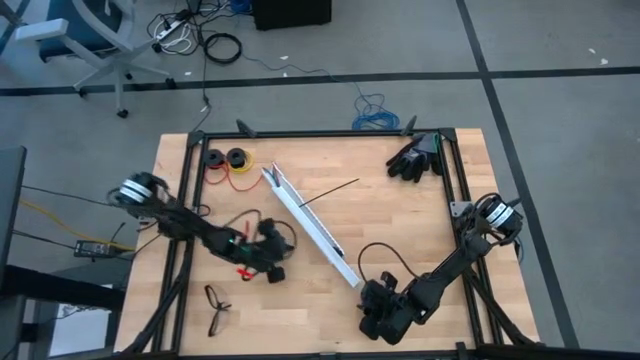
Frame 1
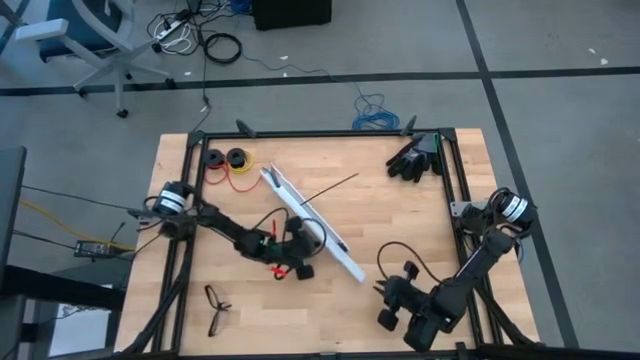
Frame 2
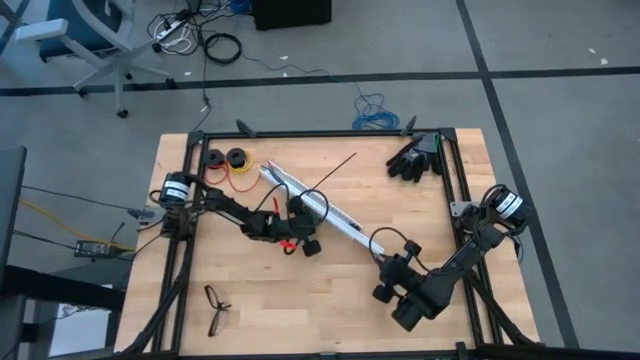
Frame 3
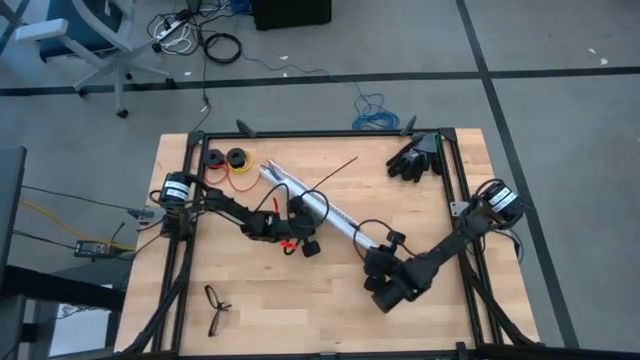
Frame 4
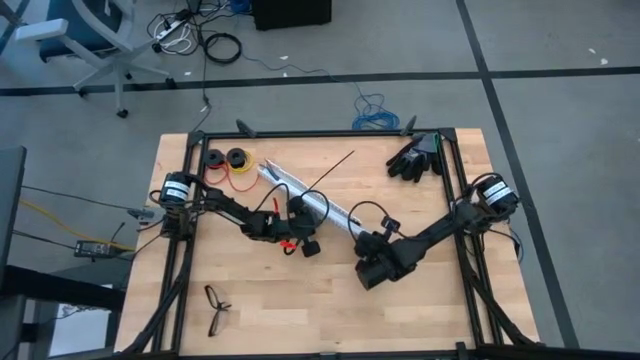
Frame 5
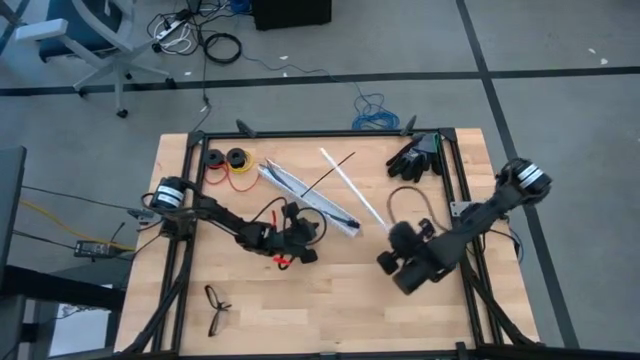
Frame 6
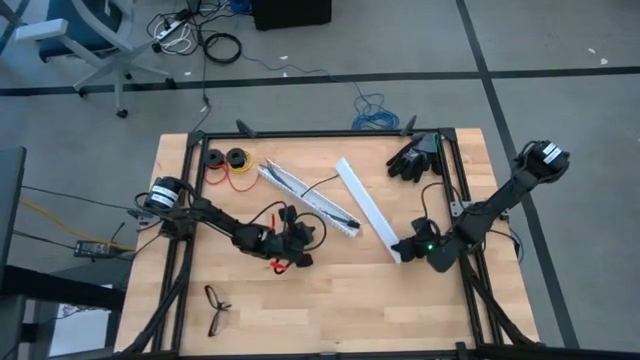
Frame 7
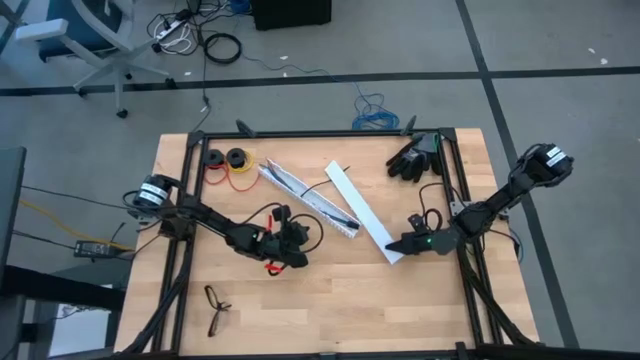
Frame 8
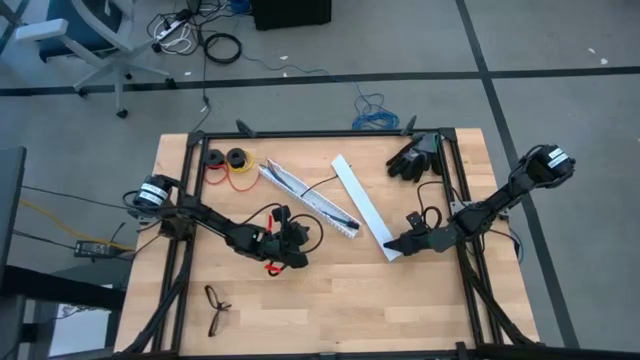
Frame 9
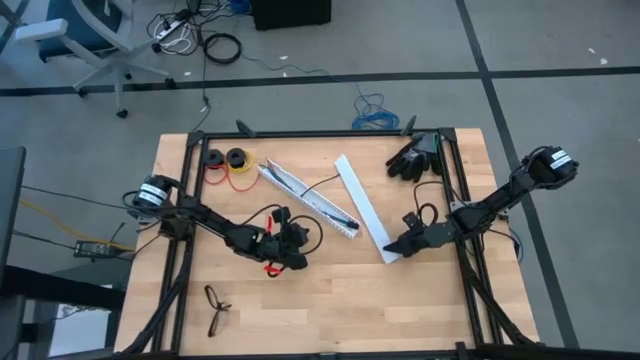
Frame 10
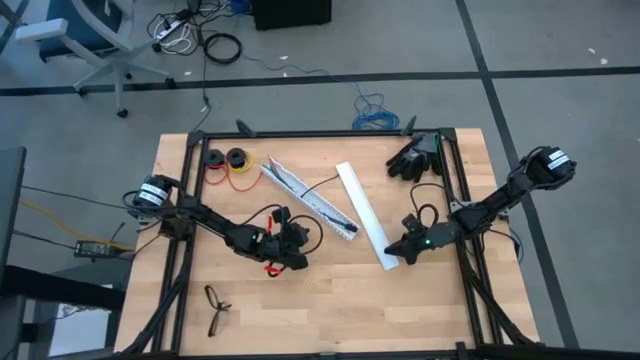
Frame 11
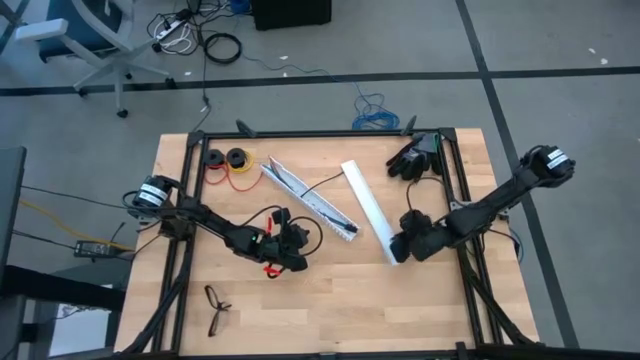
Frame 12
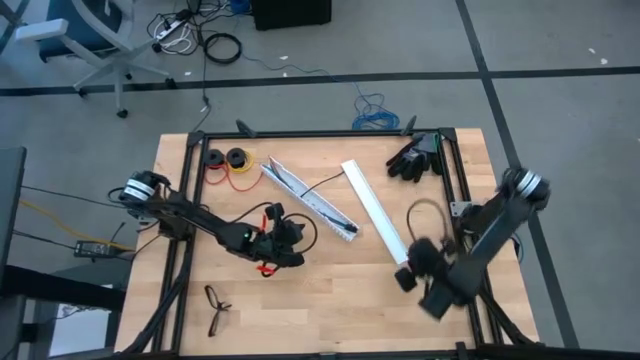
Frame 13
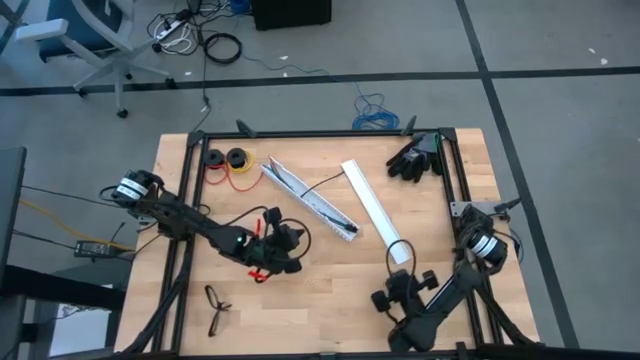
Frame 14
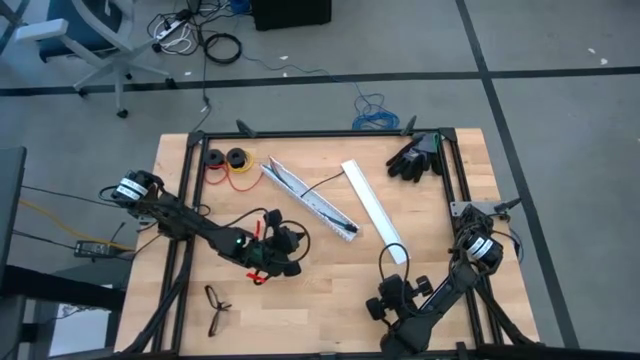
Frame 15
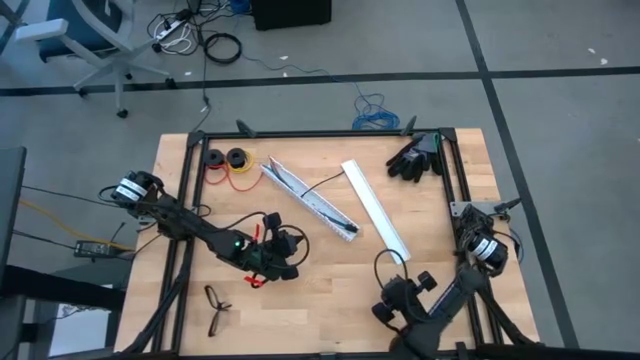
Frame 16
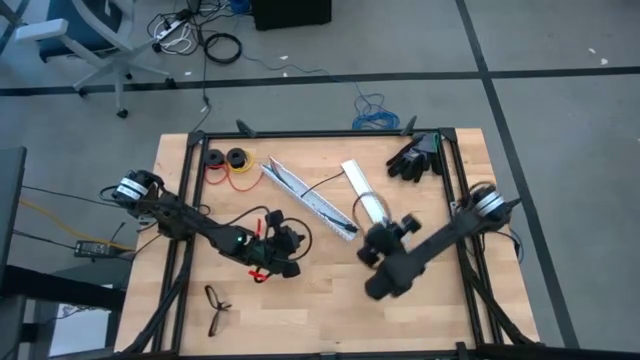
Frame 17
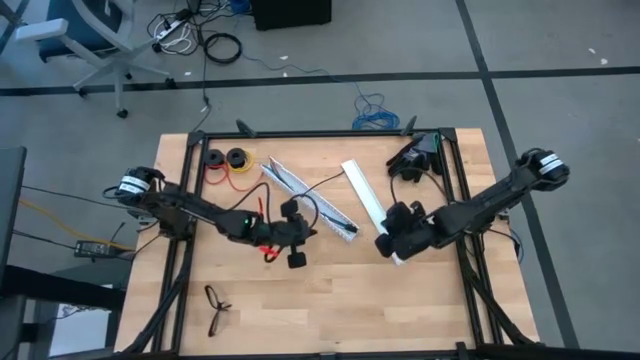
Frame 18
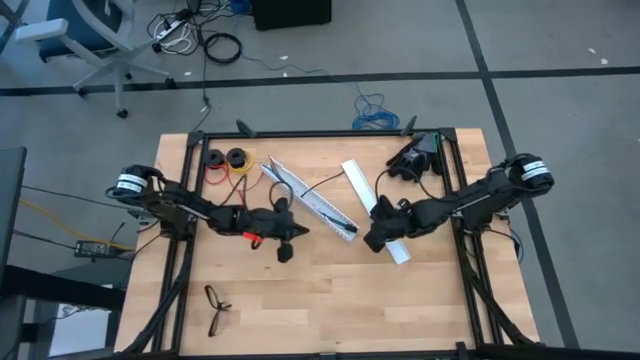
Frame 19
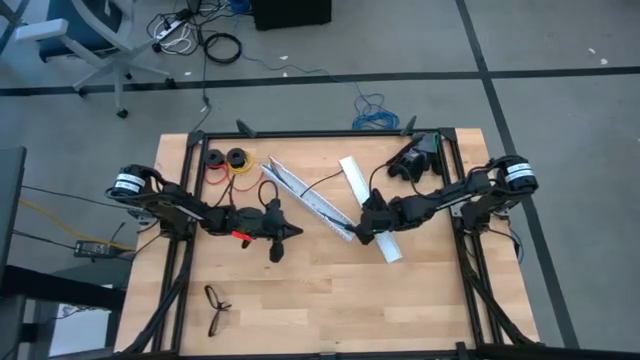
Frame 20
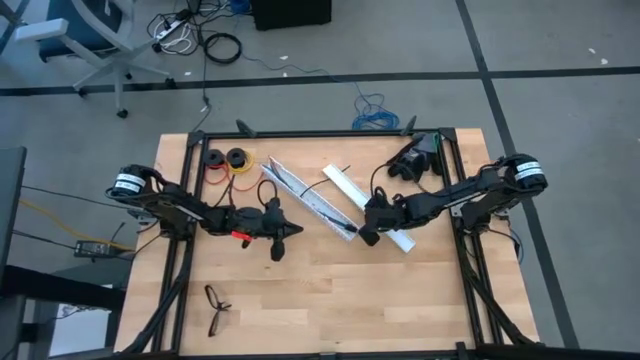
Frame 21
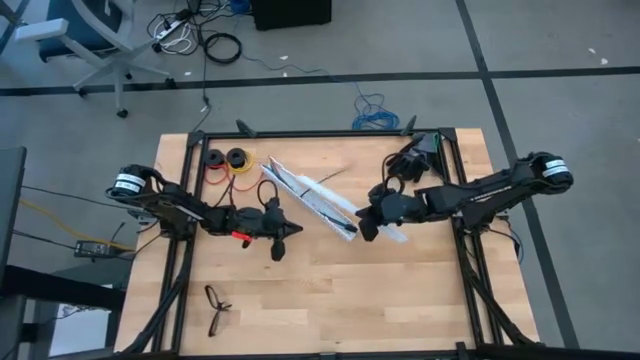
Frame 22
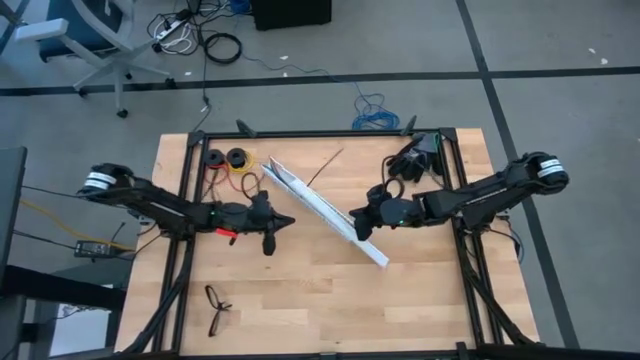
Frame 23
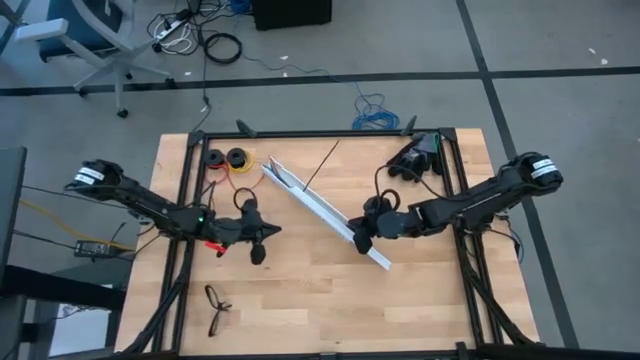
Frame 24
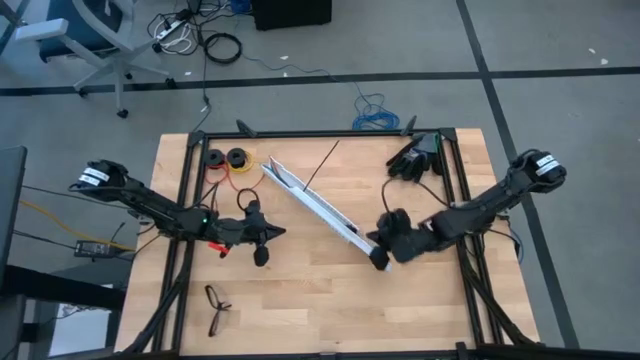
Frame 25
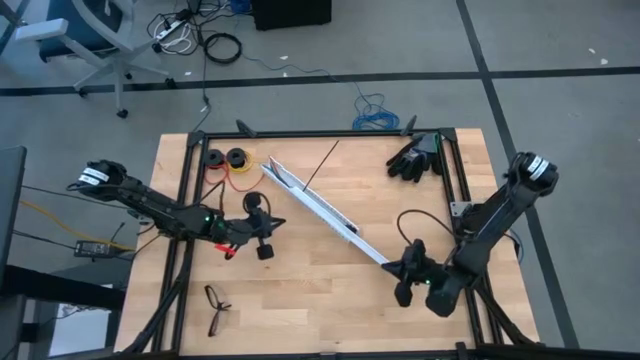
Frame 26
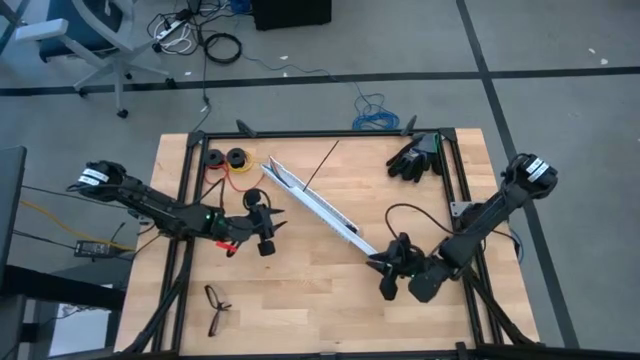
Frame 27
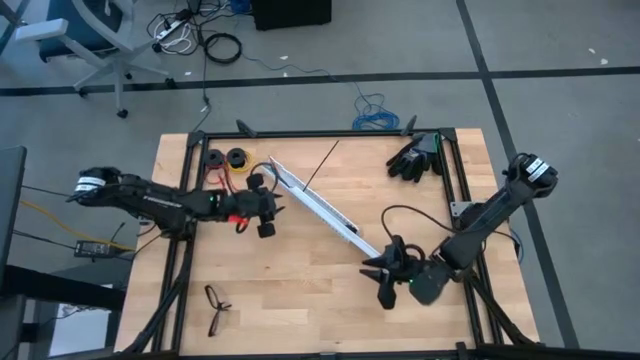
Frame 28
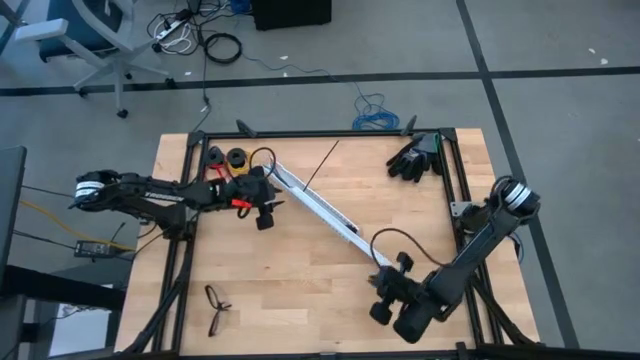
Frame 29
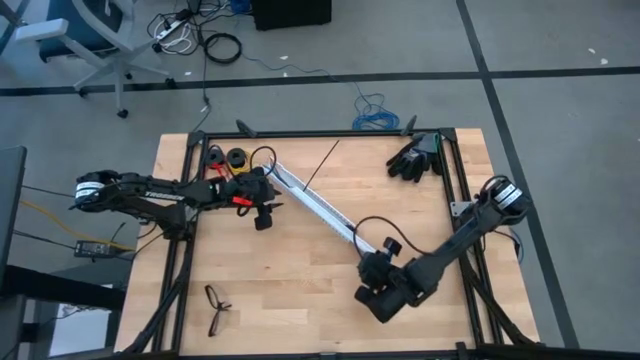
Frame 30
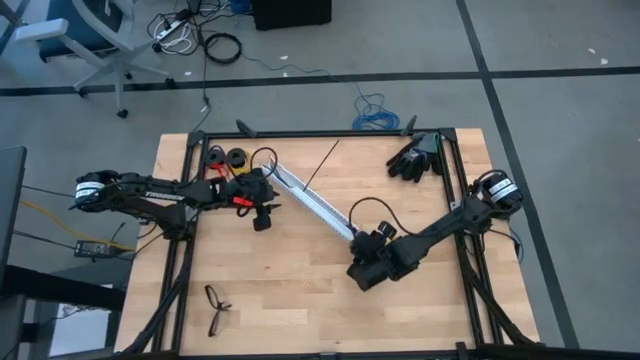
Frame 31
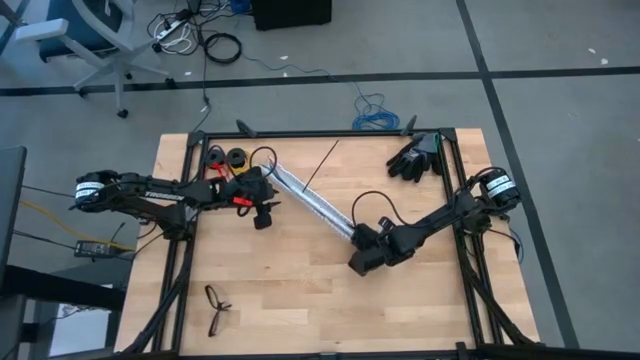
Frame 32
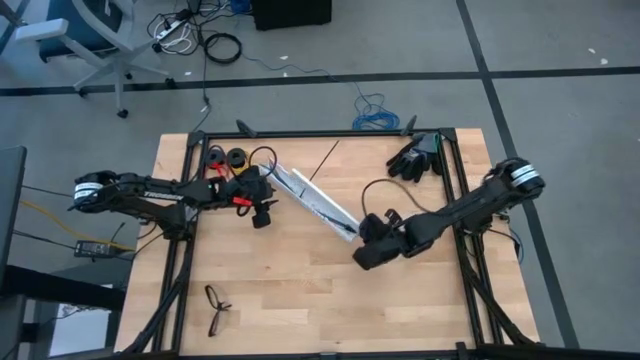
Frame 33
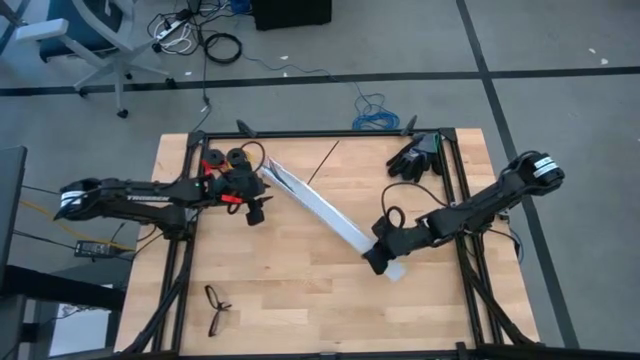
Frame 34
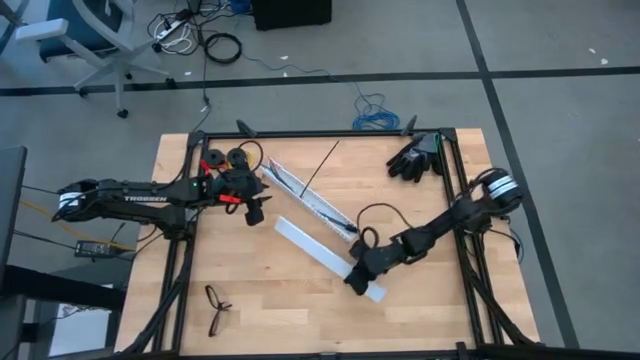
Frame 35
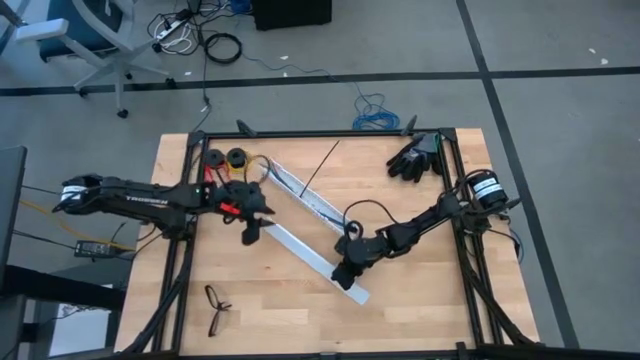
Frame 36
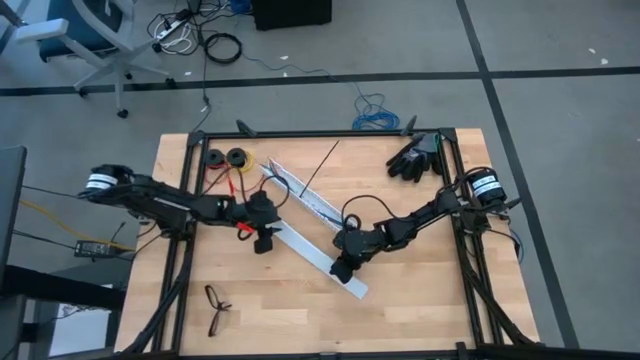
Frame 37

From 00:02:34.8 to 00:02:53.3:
Task: Ziptie cables
Close the white cable duct

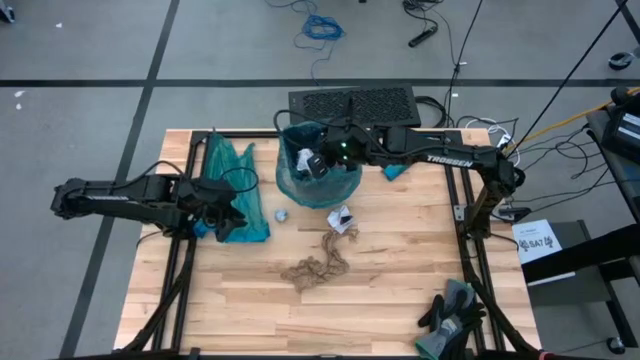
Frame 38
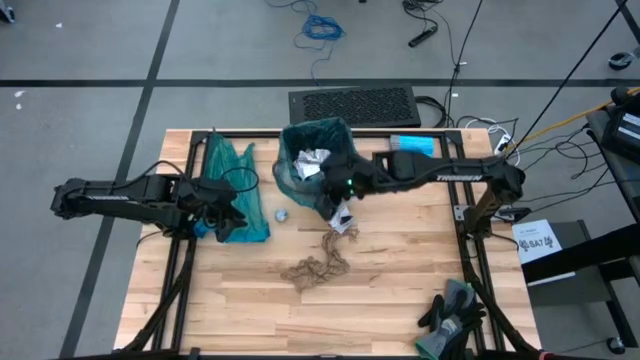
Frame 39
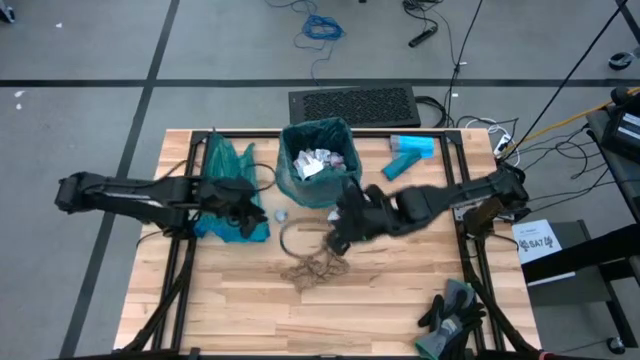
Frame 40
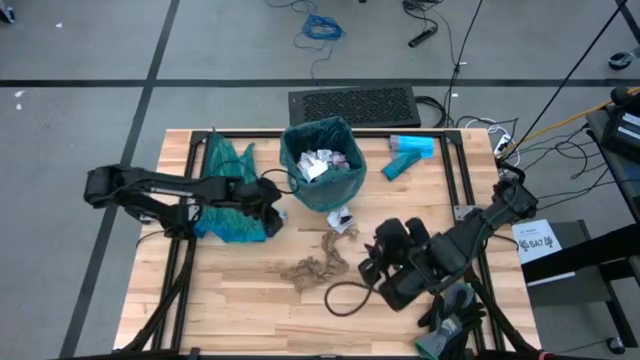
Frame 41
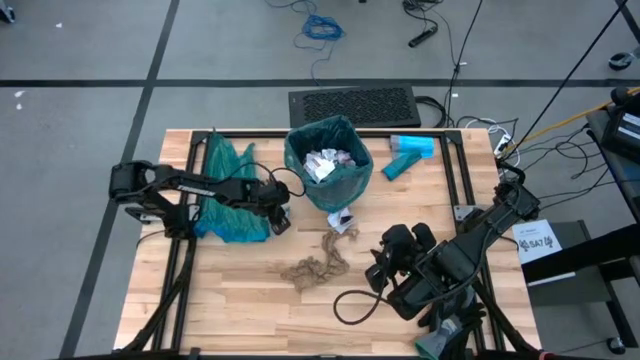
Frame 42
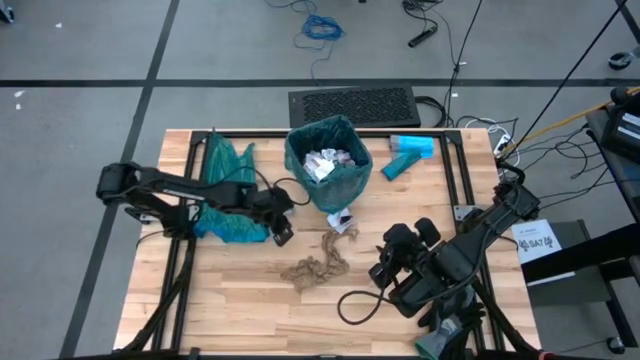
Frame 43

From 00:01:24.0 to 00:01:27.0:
Task: place trash/remove bag and relplace
Put the blue plastic into the blue trash bag inside the black trash bin
